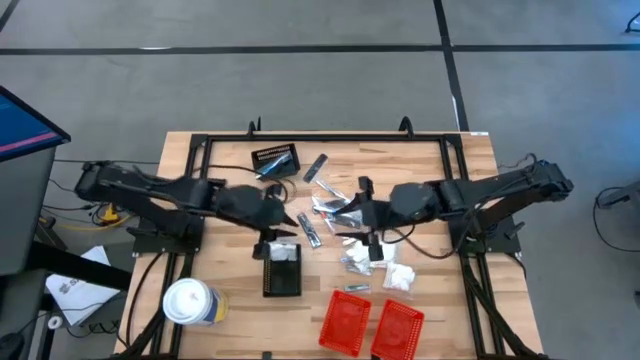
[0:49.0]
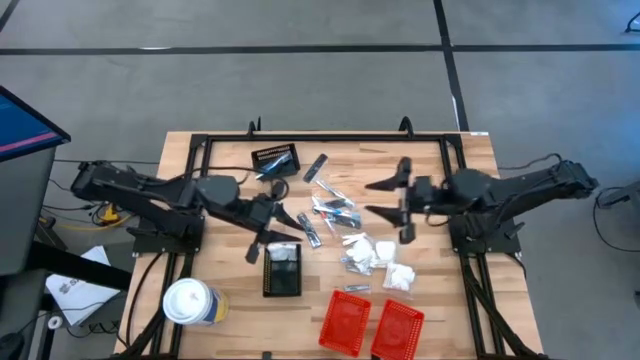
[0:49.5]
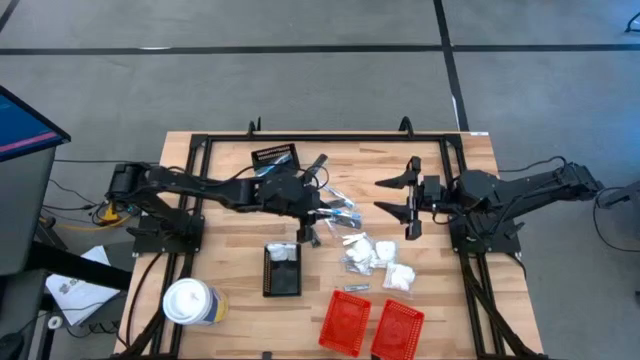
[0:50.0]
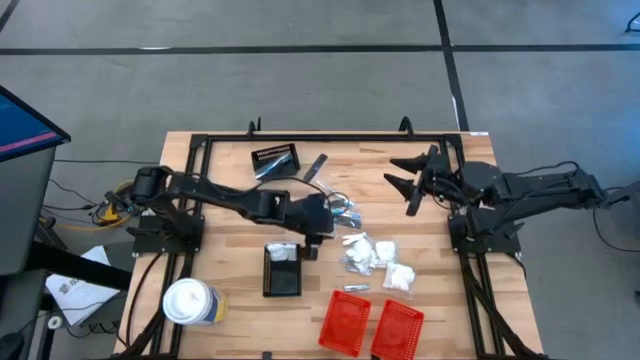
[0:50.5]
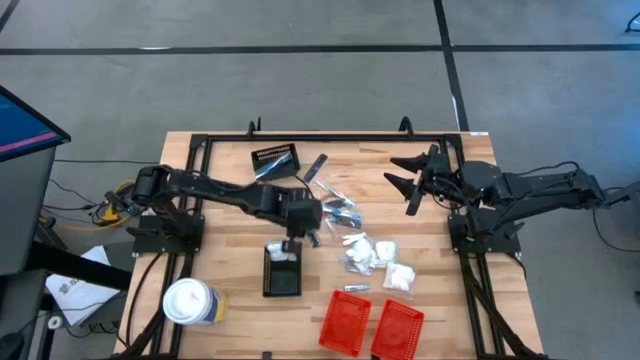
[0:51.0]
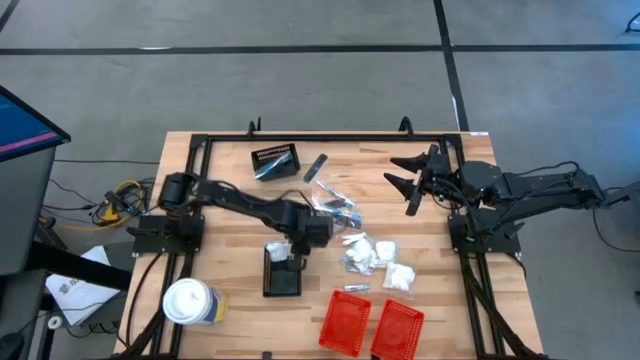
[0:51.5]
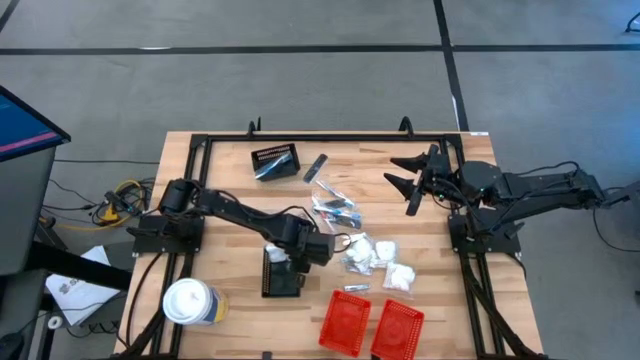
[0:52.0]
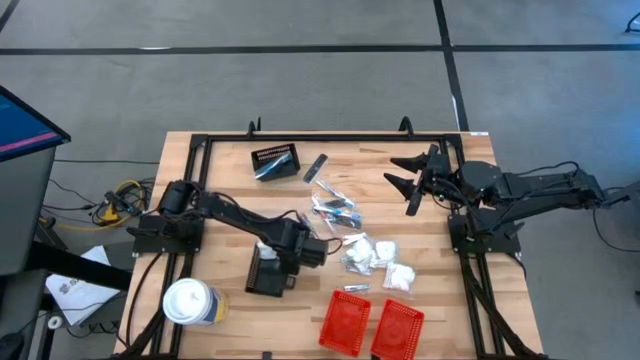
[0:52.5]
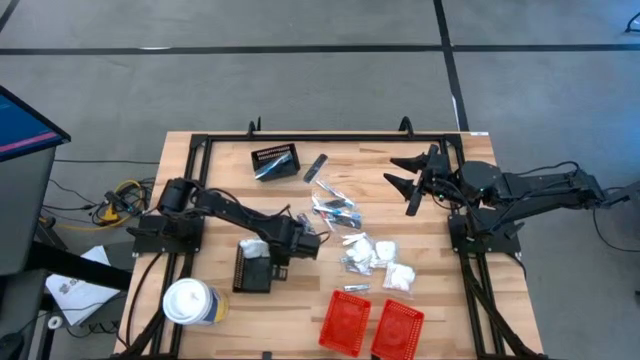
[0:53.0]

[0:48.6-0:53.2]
Task: Pick & Place Travel size toiletries
Adjust the bottom black bin

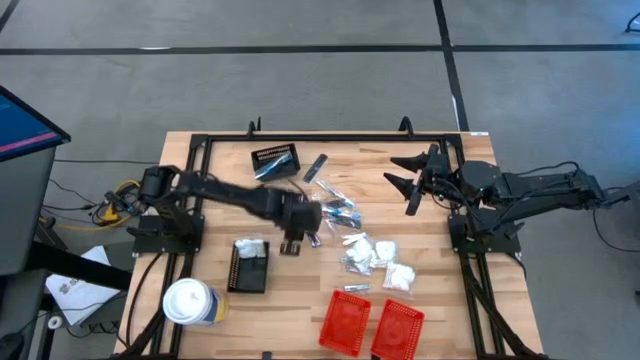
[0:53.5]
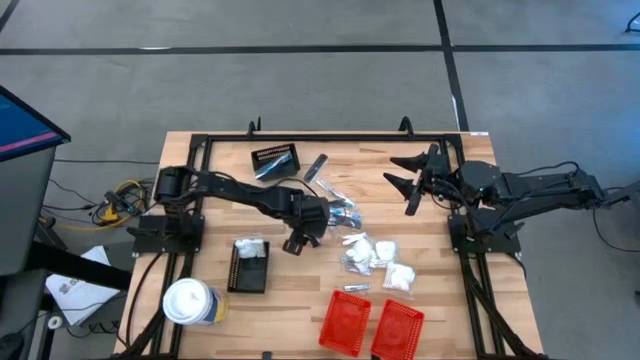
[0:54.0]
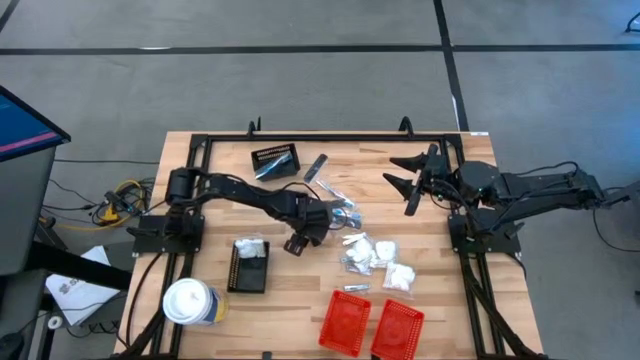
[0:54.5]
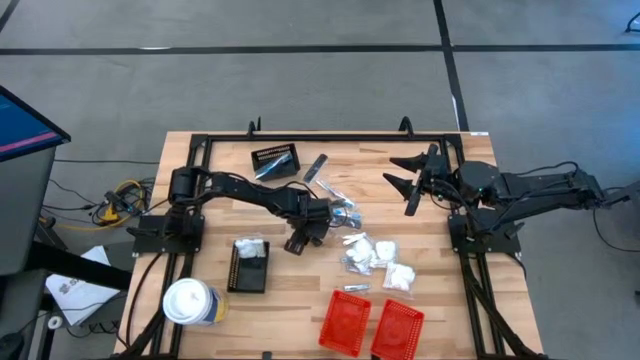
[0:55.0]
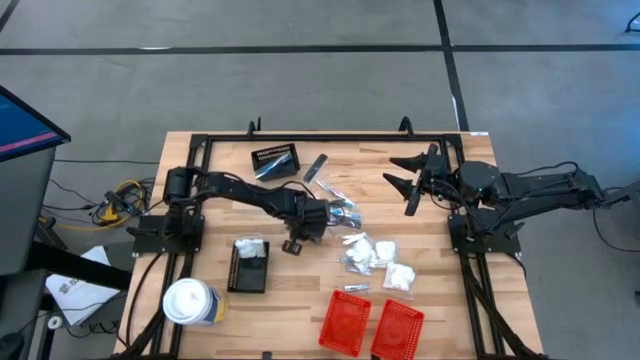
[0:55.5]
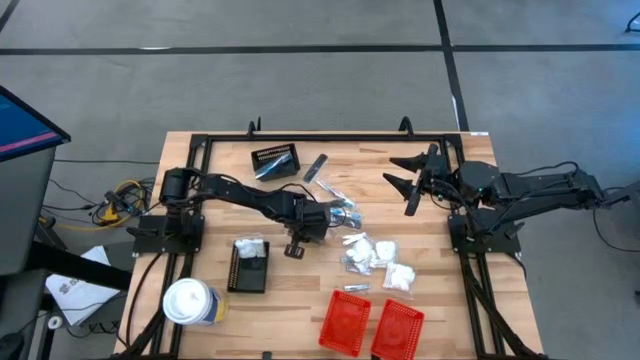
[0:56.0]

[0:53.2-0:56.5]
Put the black hair brush into the right red bin

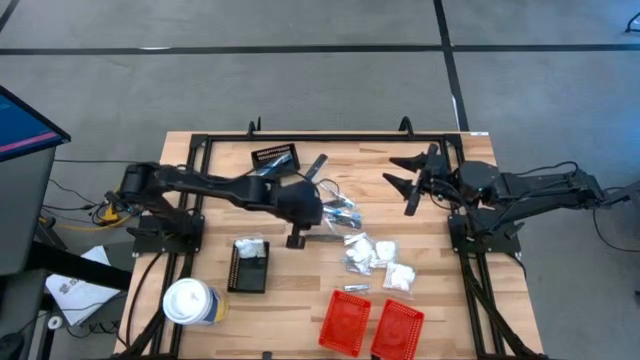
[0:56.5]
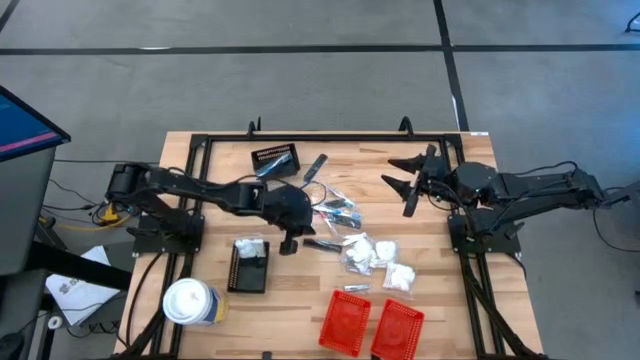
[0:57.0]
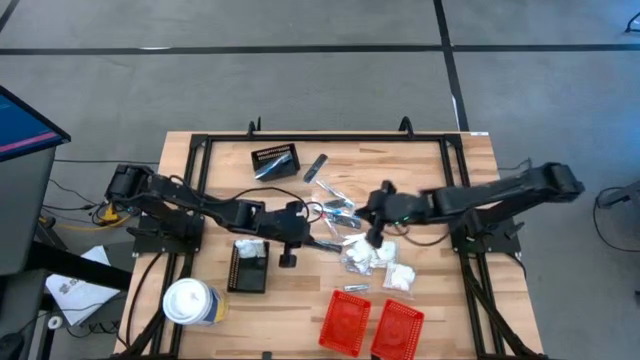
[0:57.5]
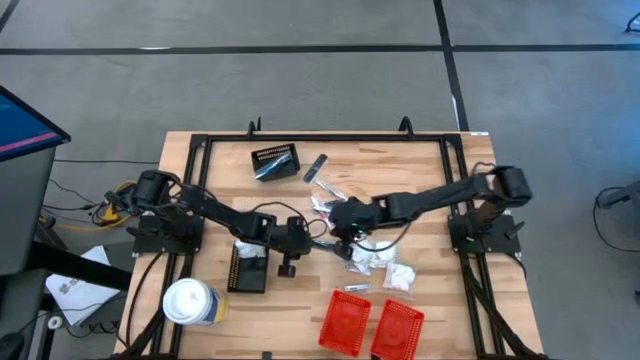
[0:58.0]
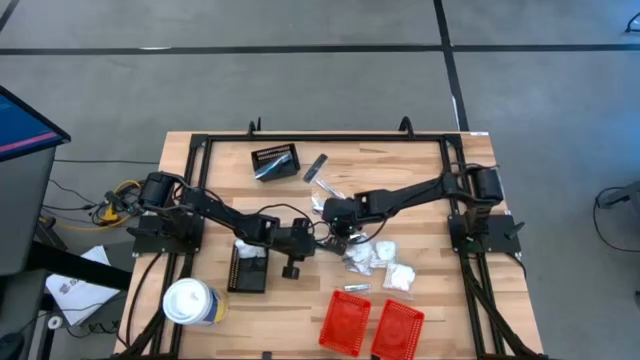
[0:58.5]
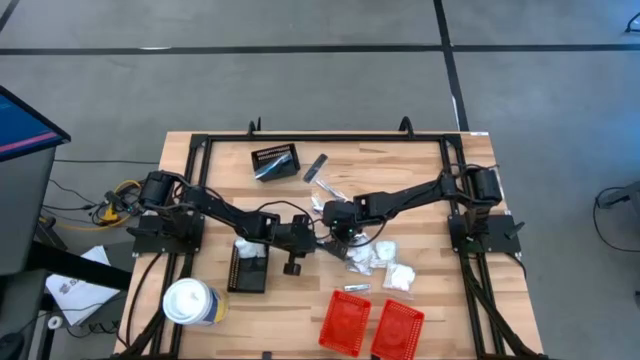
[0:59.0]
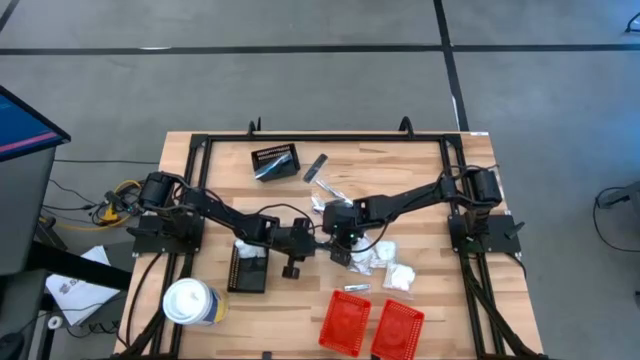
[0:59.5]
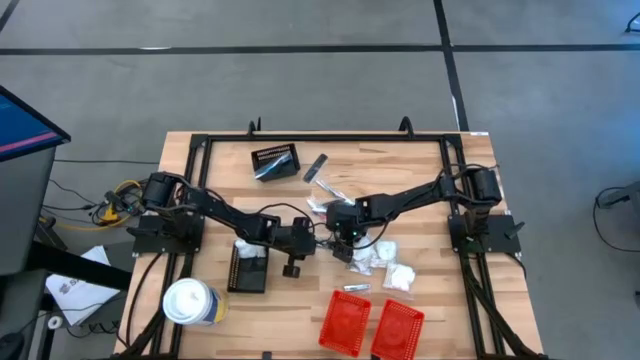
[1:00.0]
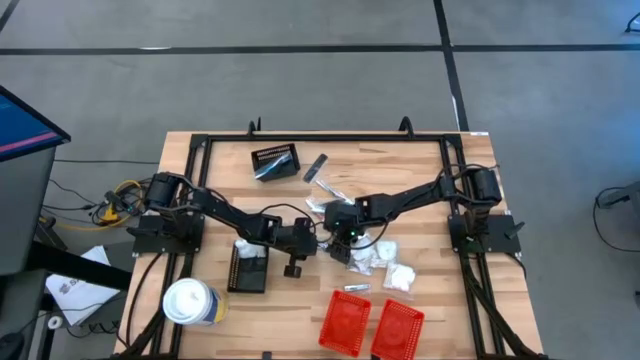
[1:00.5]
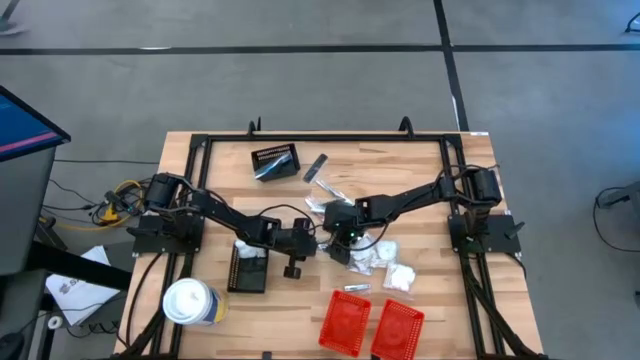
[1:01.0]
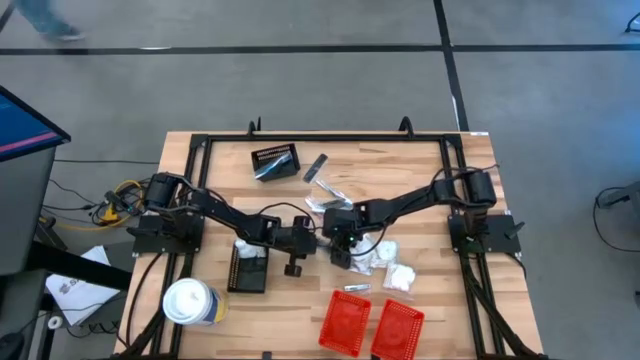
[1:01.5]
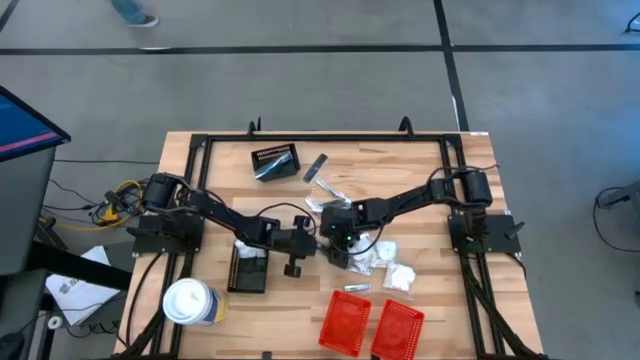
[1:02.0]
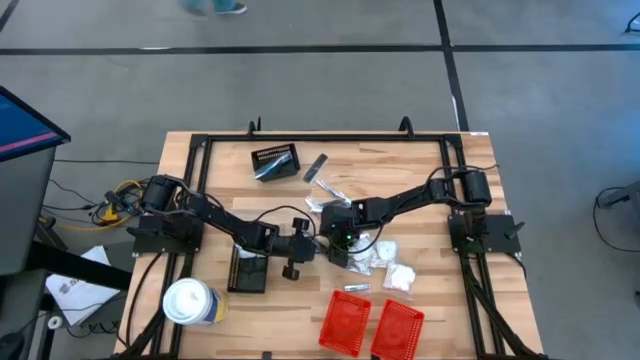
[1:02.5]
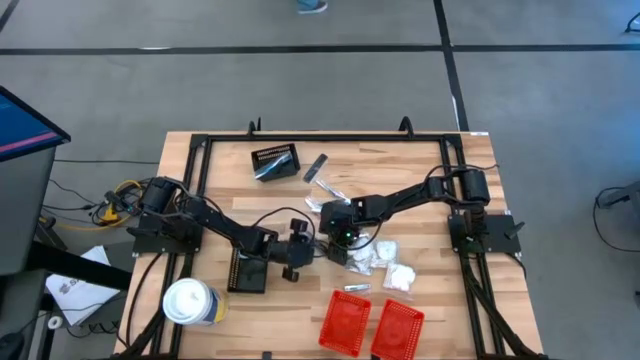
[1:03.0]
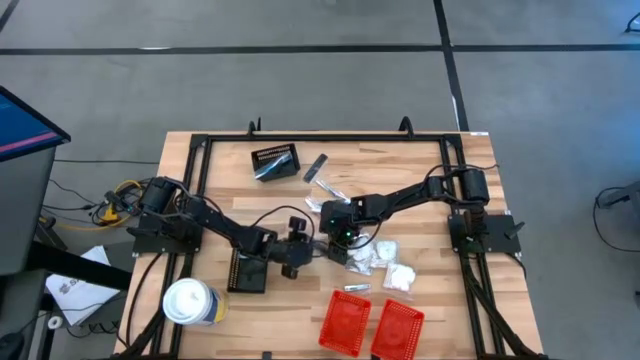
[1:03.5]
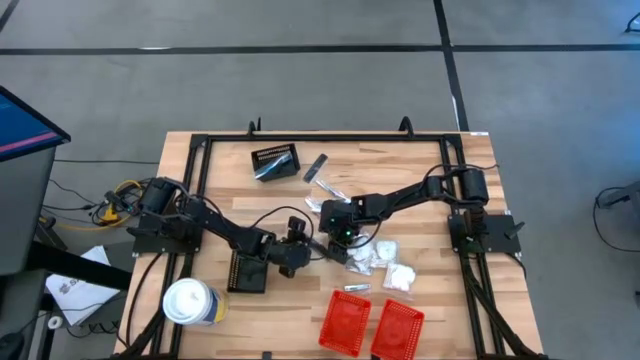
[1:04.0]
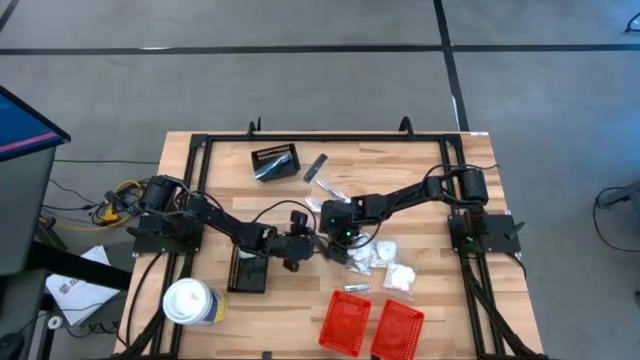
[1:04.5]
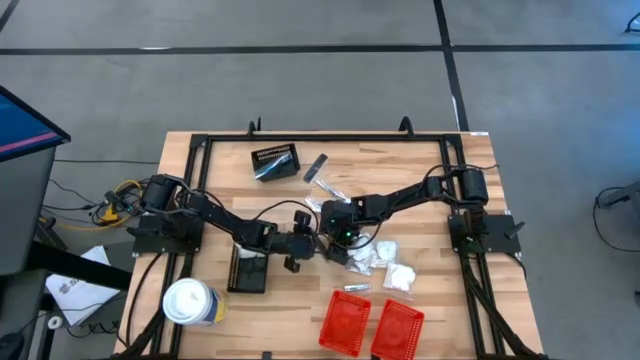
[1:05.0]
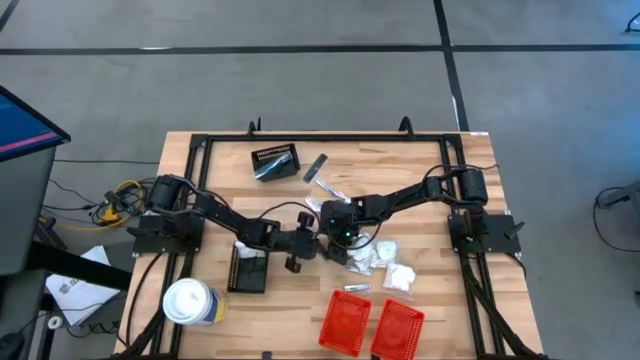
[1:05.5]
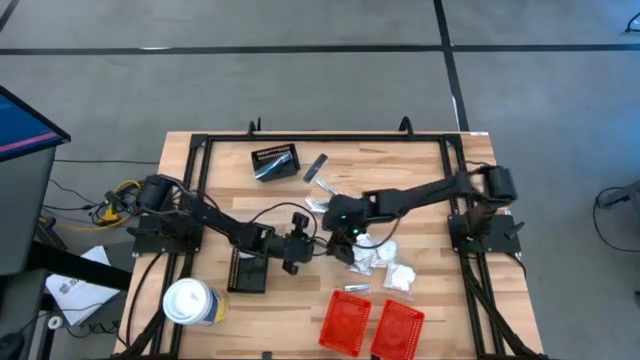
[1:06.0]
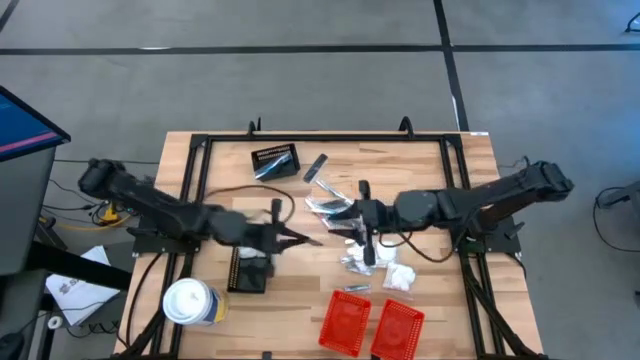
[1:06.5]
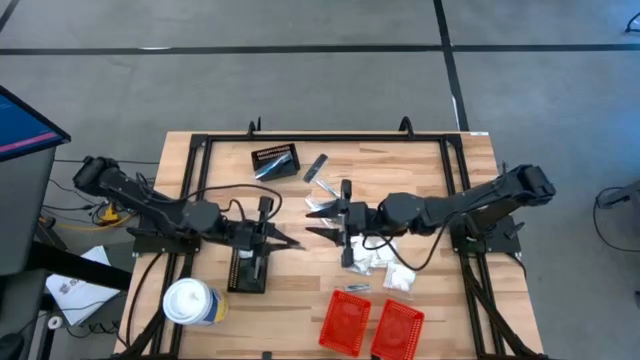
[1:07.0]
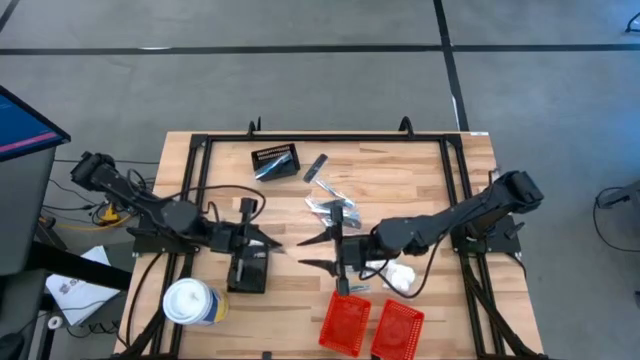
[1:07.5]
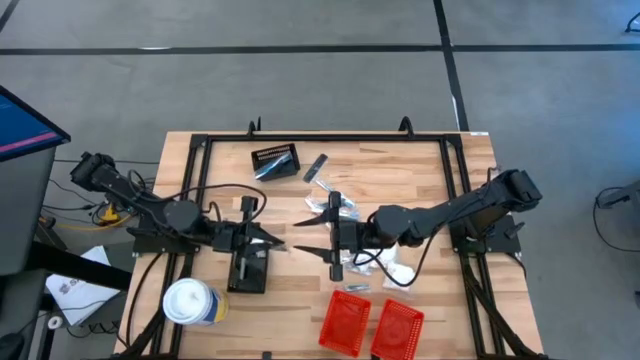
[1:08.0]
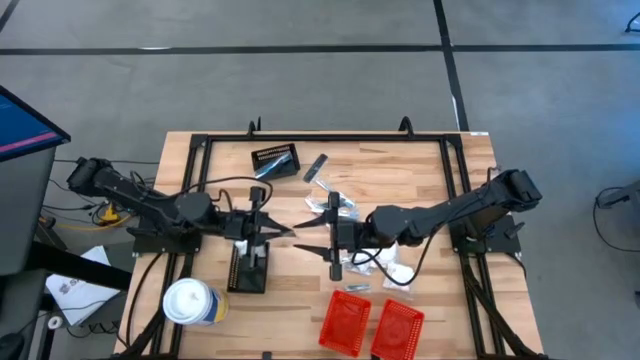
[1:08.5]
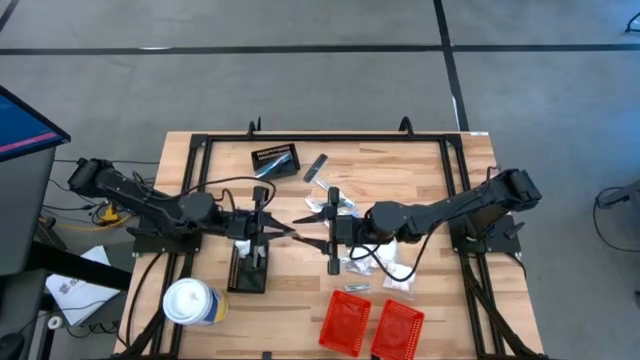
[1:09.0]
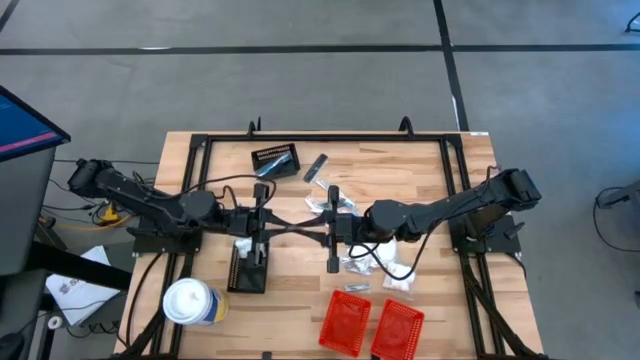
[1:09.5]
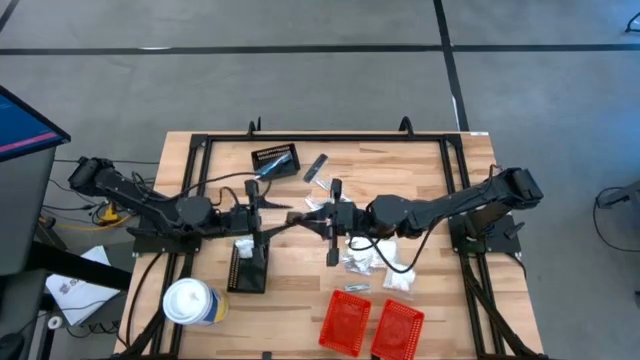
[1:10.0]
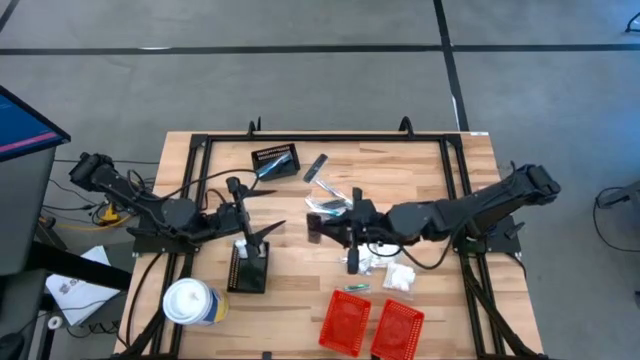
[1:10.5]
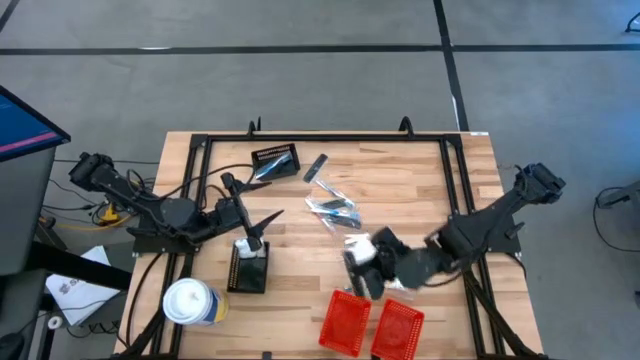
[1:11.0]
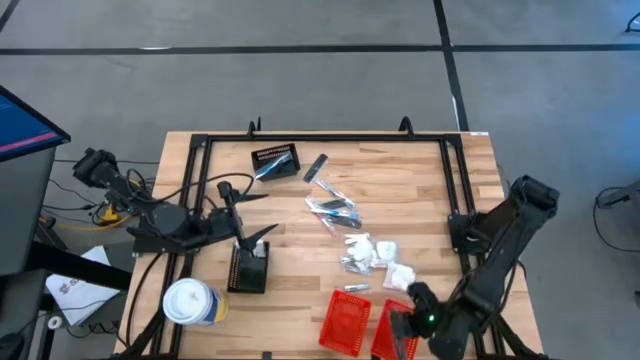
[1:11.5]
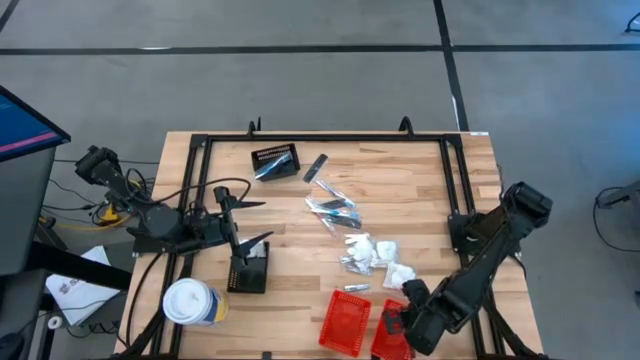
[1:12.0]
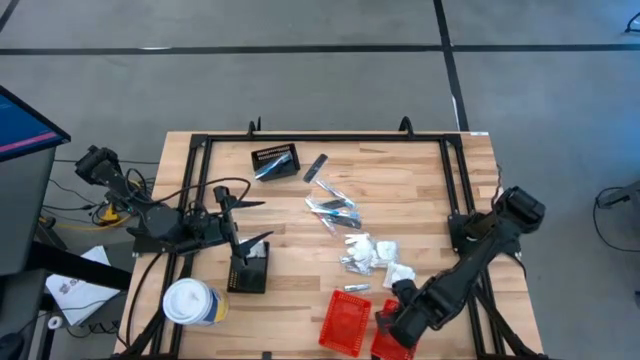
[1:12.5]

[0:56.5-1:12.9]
Put the black hair brush into the right red bin
